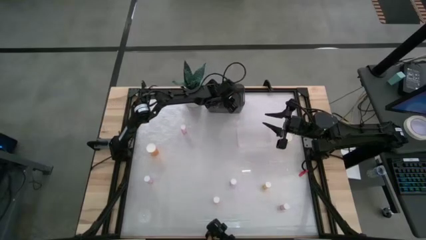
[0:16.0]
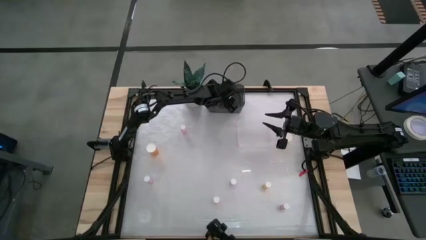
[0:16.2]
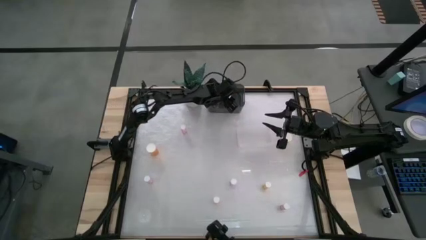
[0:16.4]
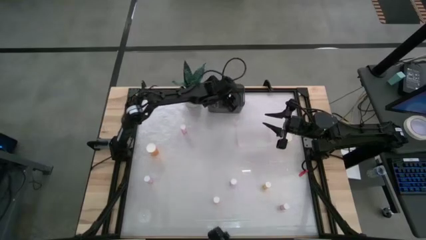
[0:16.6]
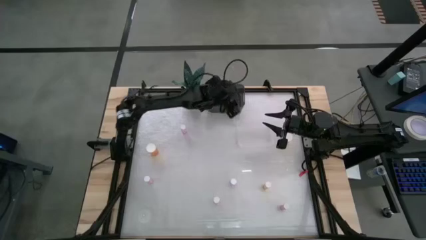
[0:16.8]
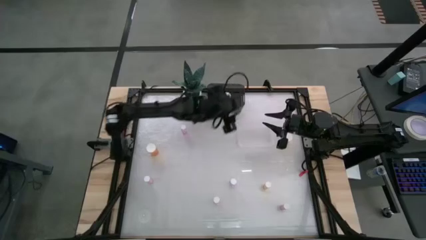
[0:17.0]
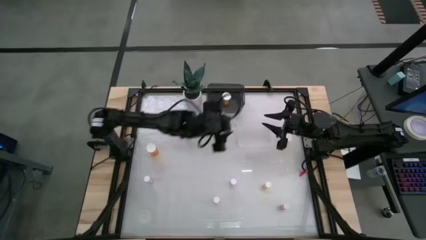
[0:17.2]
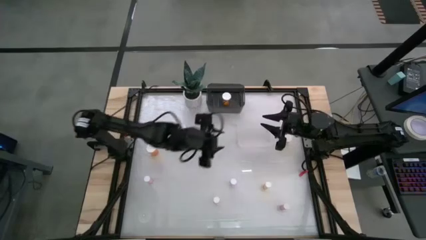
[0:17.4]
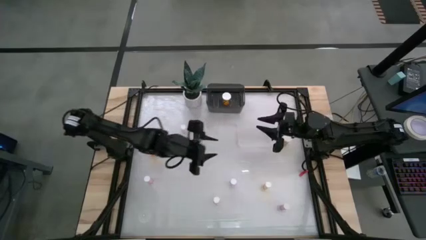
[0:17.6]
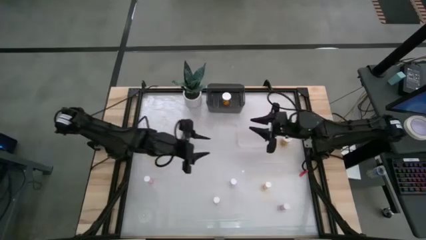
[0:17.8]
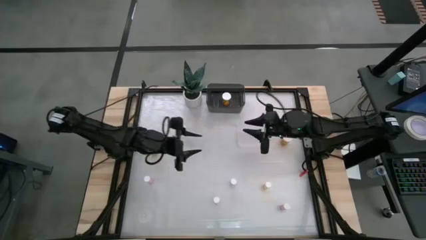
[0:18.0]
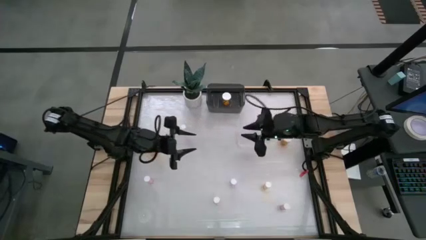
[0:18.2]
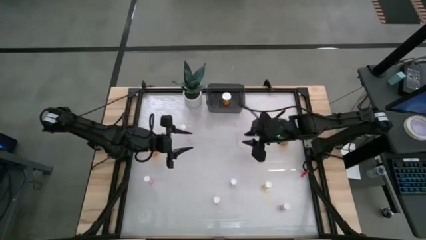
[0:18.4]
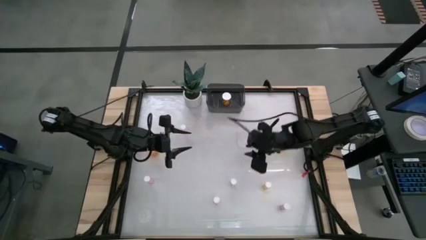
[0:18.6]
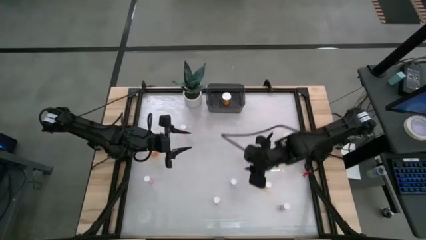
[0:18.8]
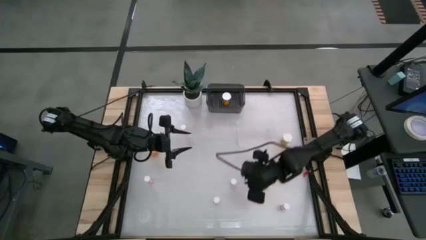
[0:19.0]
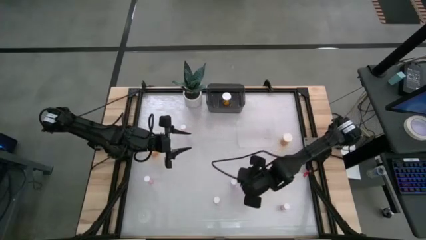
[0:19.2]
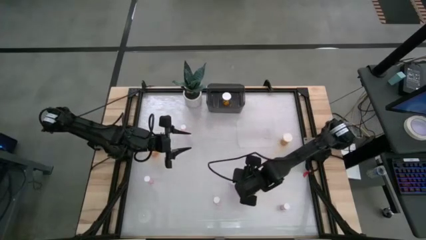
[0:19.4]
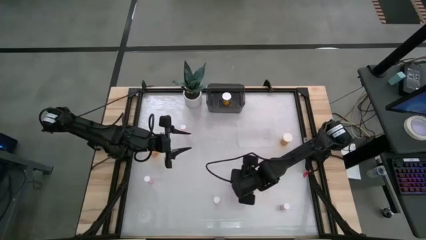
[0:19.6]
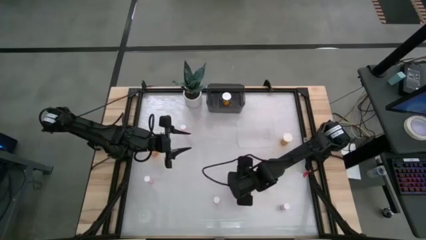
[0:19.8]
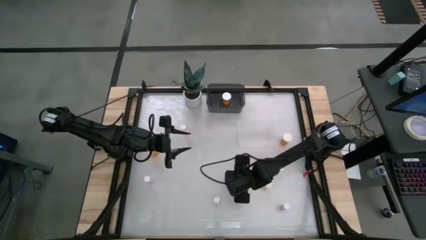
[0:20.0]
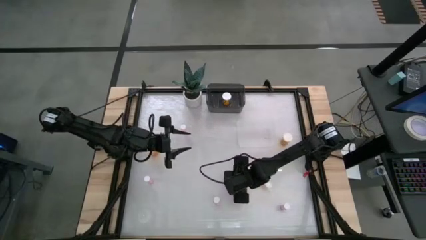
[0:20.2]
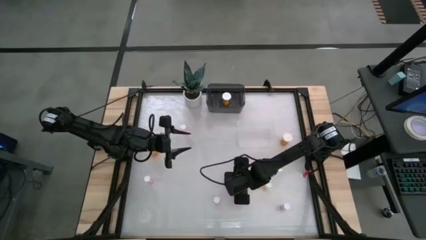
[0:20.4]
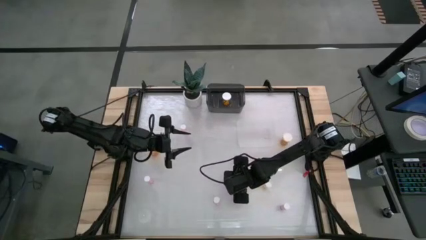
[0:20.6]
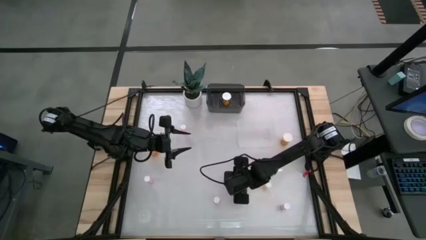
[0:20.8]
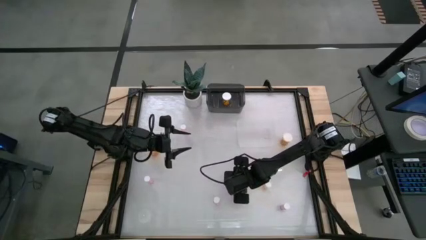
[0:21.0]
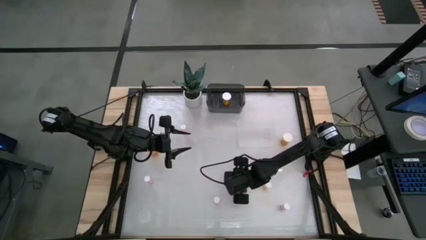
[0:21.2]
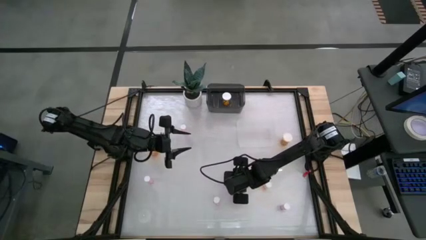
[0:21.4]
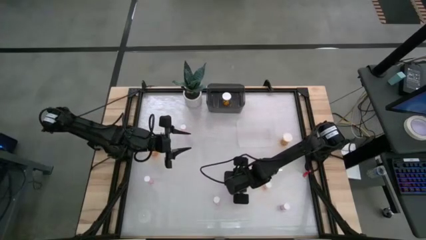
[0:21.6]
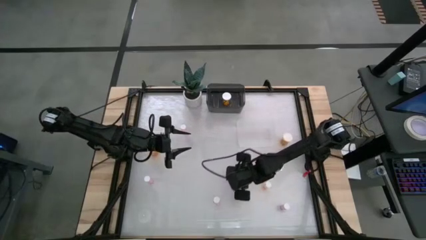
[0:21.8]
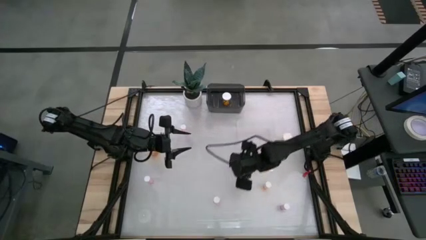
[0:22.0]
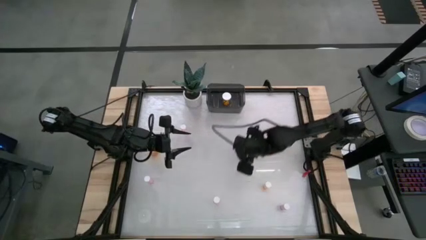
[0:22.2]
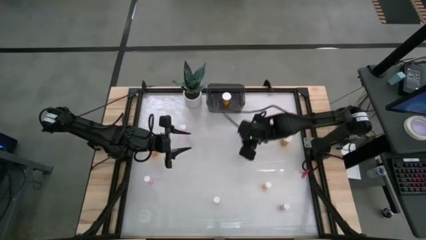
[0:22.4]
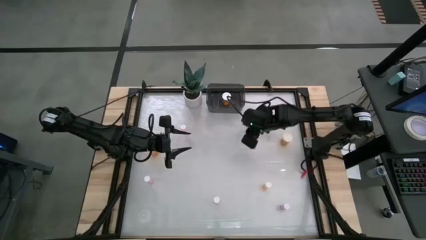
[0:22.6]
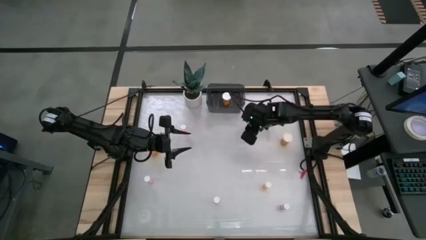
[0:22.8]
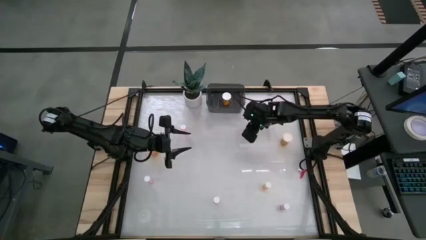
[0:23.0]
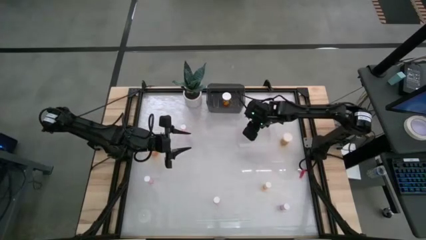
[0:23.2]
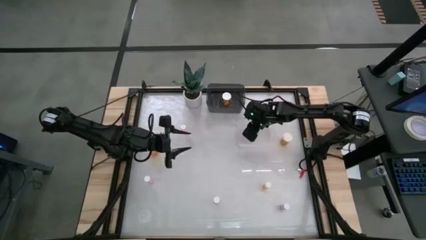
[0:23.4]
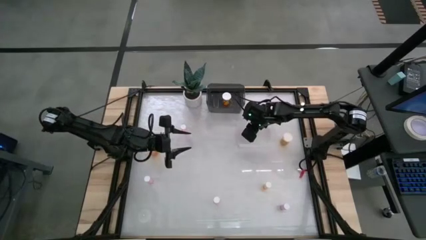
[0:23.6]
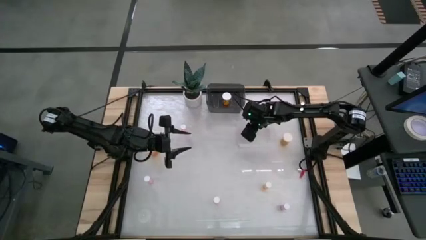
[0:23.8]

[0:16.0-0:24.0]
Task: Pick and place medicine bottles into bin by pill shape (circle, oval)
Put the small pink pill bottle into the white bin

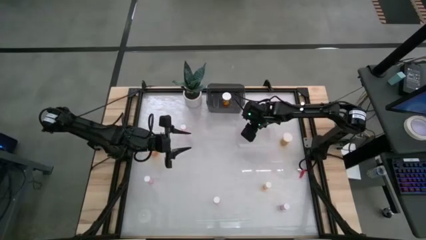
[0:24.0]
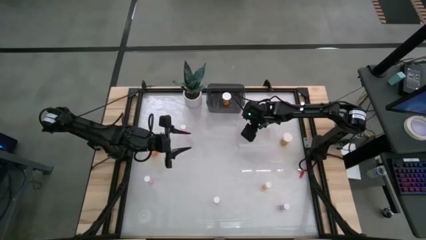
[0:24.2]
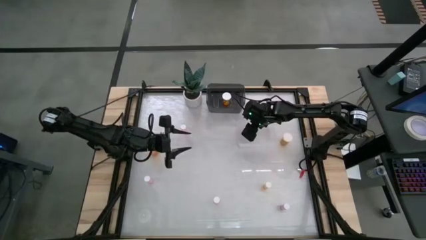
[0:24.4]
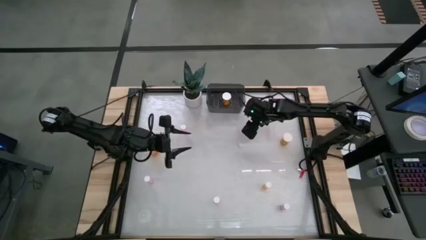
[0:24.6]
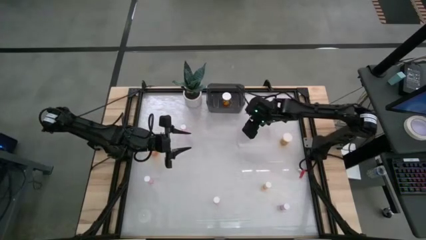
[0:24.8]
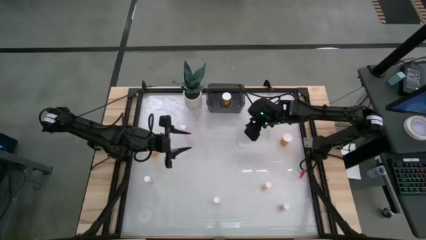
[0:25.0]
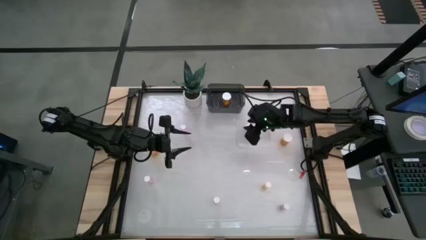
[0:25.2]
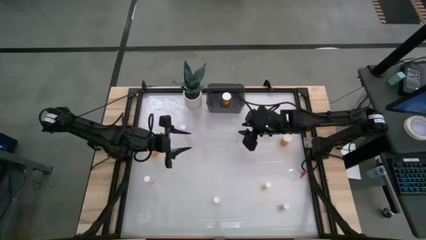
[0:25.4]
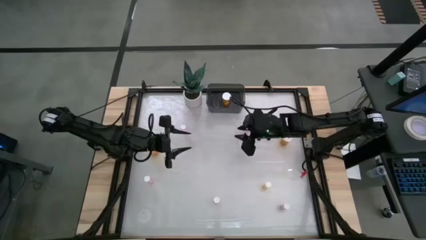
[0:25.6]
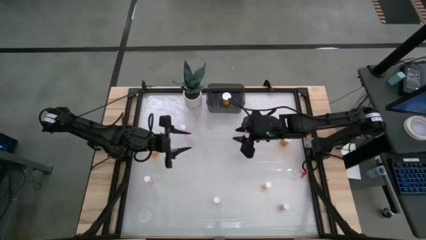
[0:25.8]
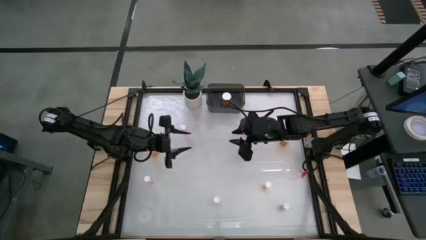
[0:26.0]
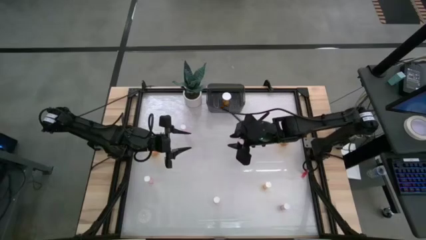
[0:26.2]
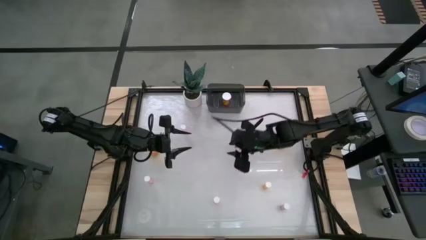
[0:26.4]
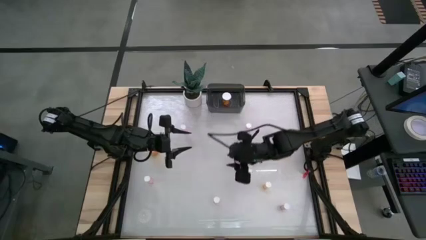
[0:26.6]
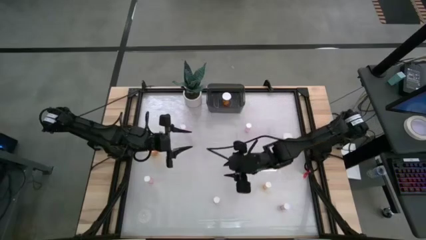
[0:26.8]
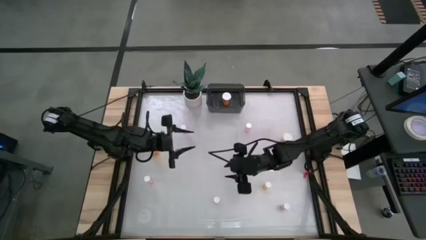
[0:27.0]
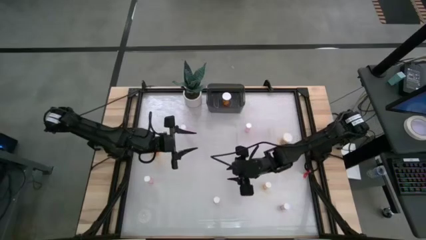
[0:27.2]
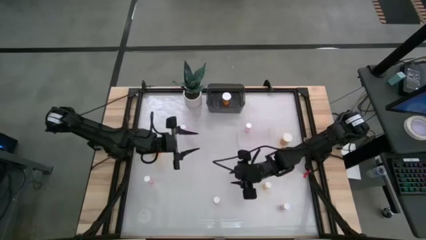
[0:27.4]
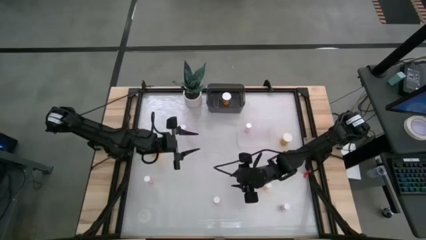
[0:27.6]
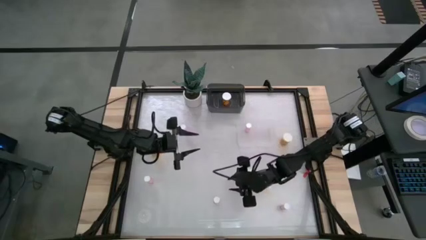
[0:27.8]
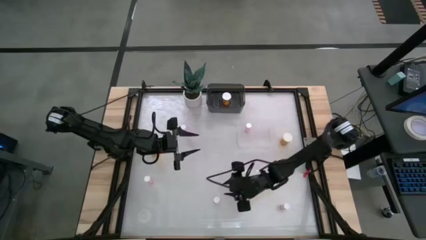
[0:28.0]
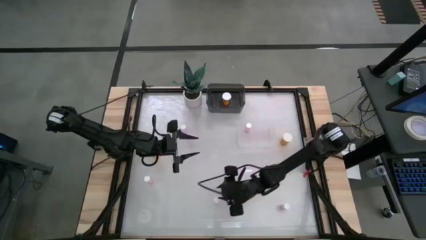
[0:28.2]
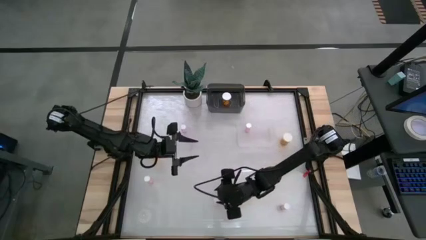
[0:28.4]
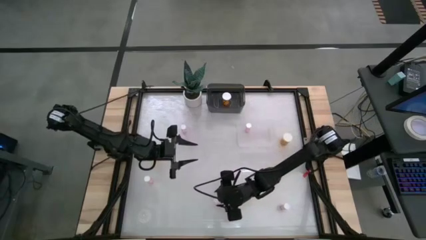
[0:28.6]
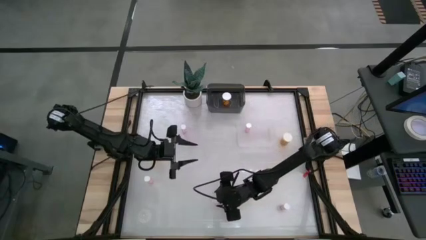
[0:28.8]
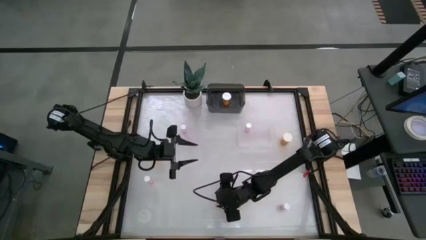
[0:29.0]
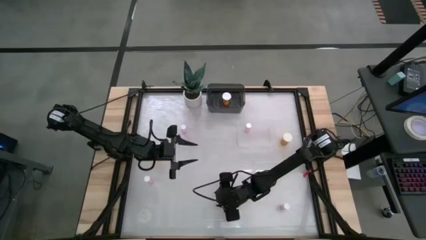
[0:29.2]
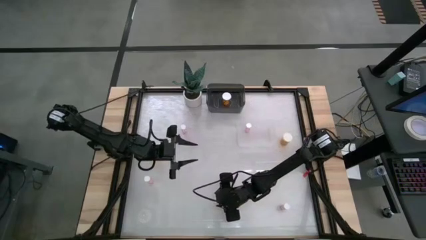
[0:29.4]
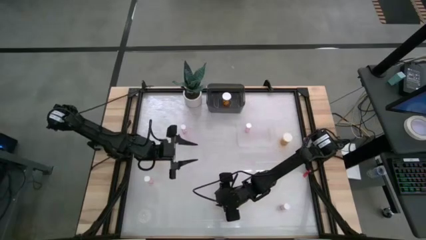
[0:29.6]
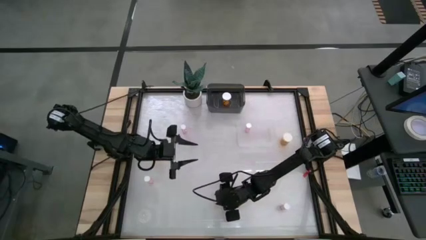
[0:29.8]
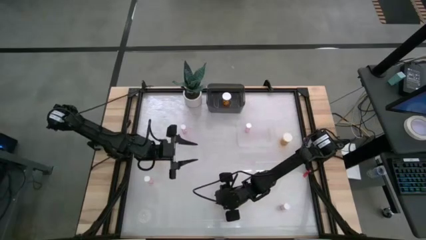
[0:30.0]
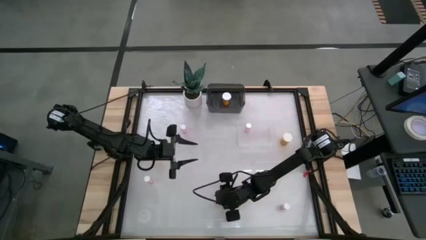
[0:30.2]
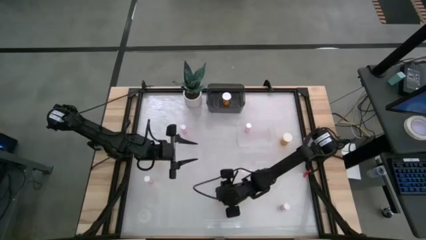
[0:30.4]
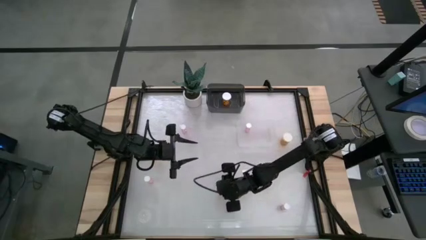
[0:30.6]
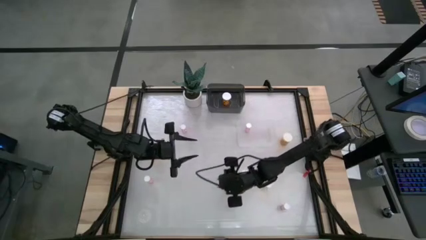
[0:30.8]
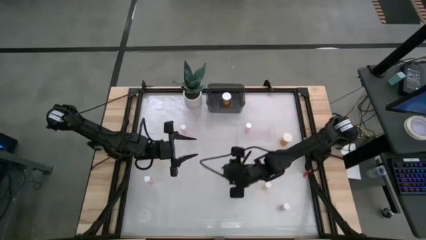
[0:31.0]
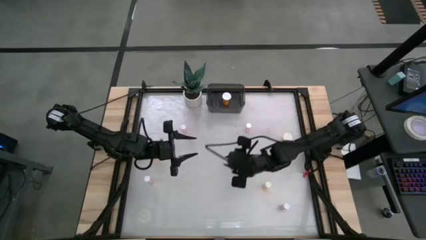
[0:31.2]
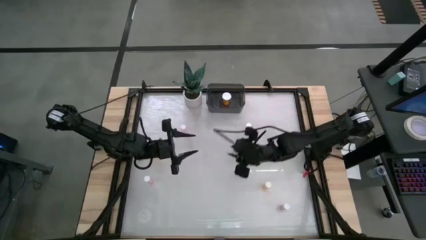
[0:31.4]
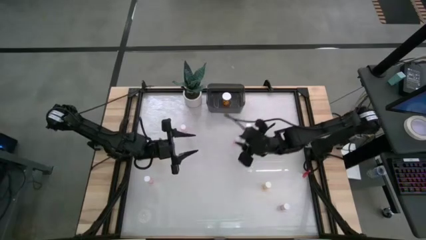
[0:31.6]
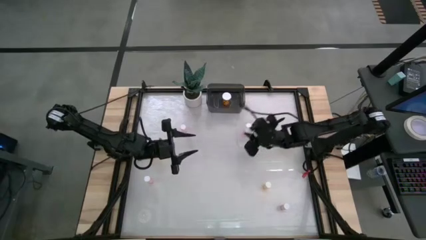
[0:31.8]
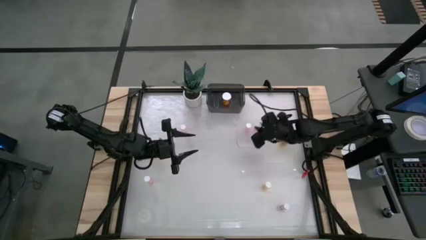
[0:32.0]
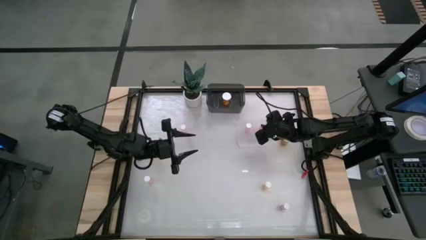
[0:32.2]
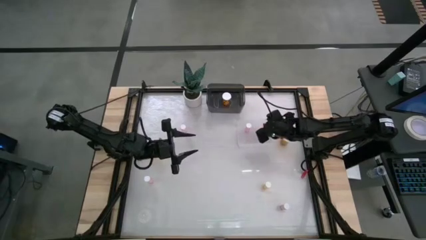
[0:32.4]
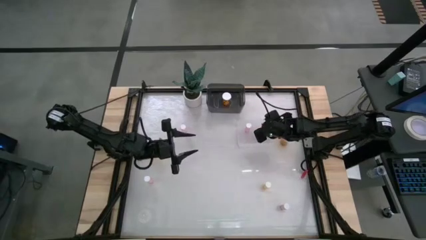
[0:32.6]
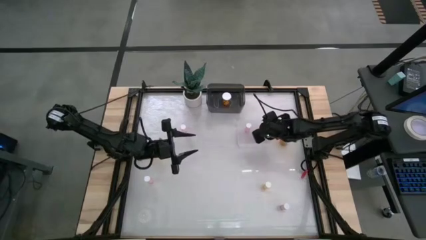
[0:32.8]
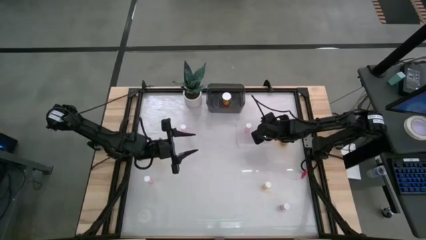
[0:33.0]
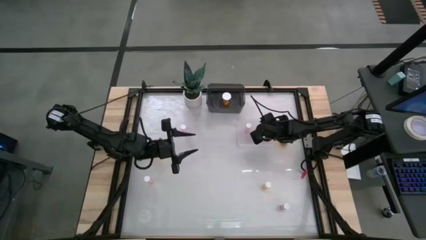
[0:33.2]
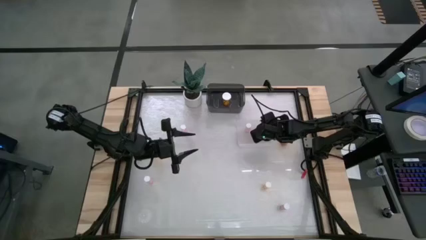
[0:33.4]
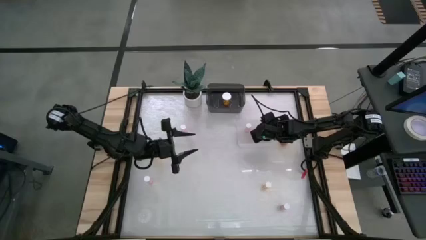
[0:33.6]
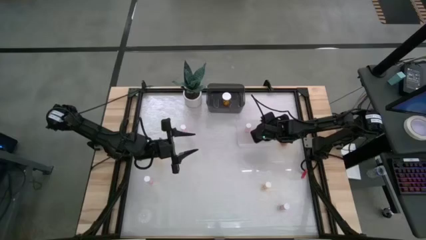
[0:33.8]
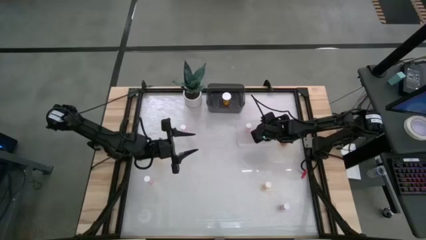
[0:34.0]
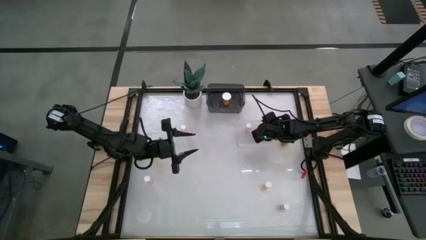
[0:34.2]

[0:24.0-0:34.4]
Put the small pink pill bottle into the white bin
